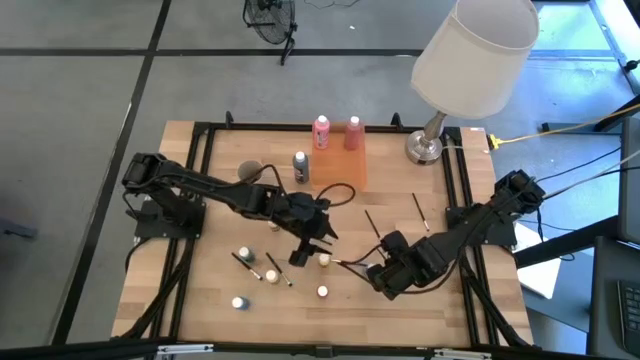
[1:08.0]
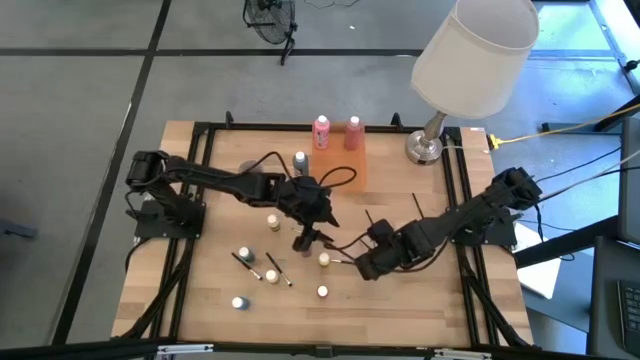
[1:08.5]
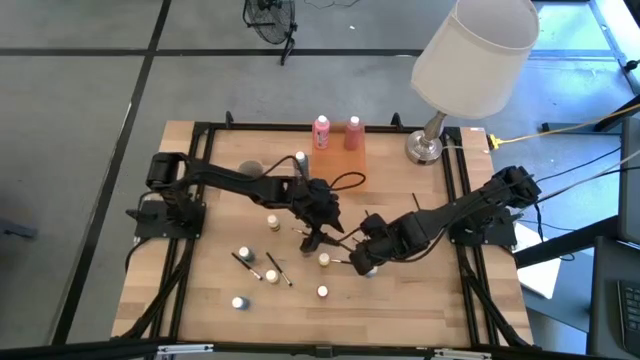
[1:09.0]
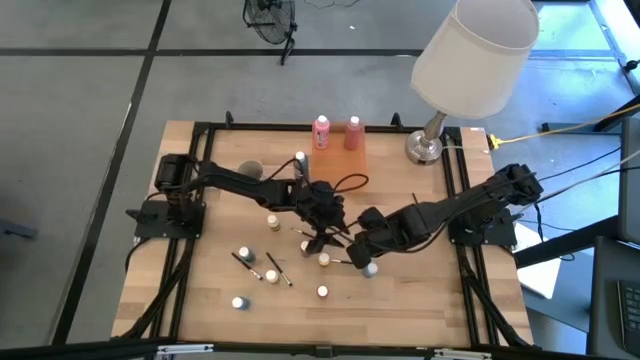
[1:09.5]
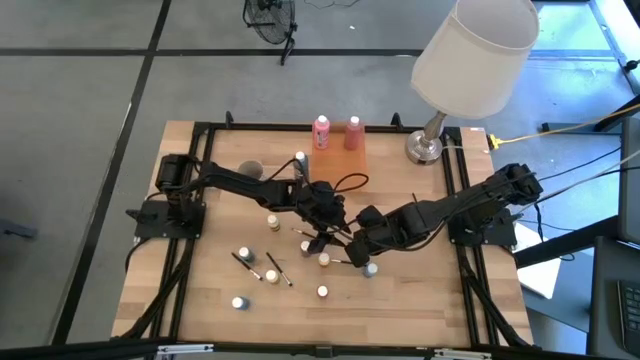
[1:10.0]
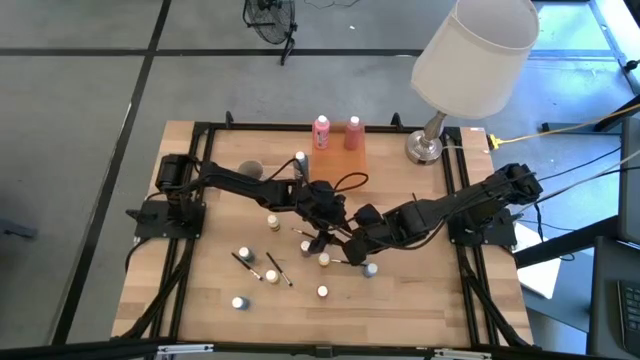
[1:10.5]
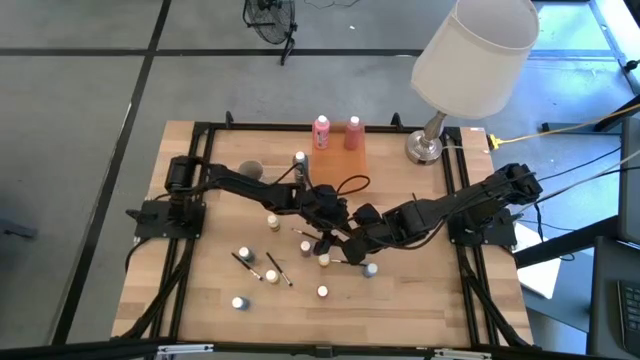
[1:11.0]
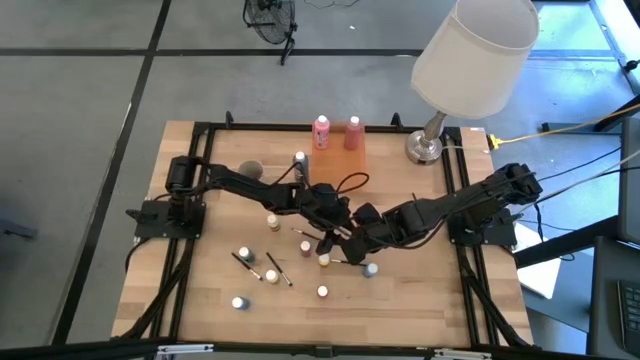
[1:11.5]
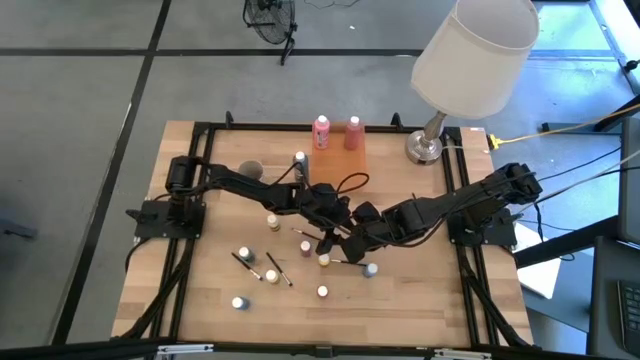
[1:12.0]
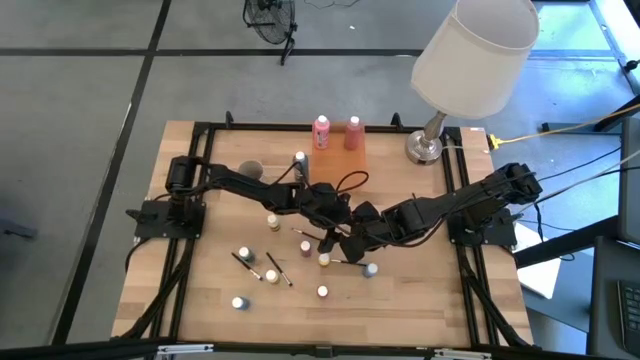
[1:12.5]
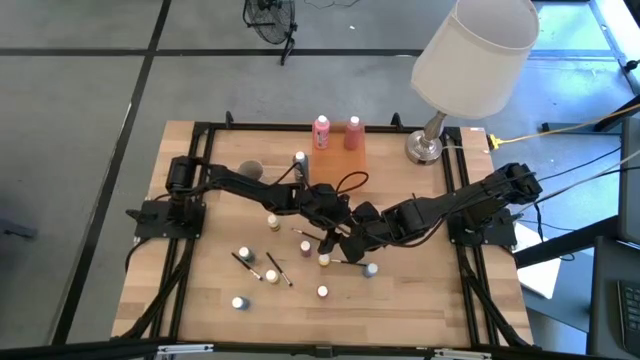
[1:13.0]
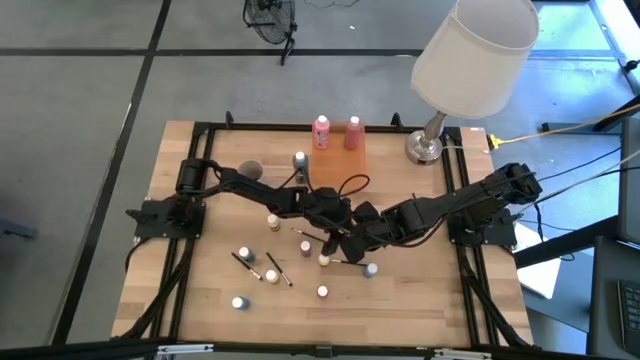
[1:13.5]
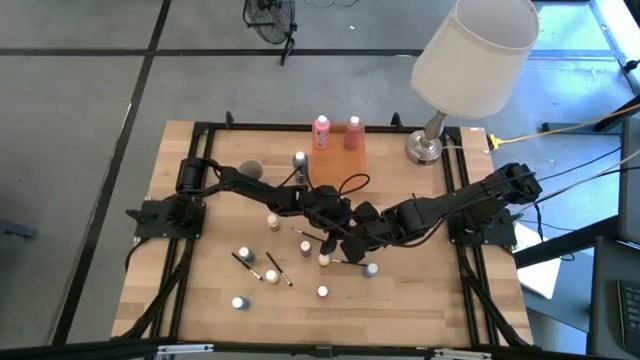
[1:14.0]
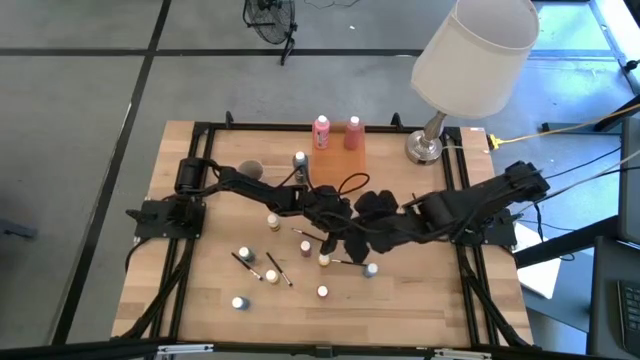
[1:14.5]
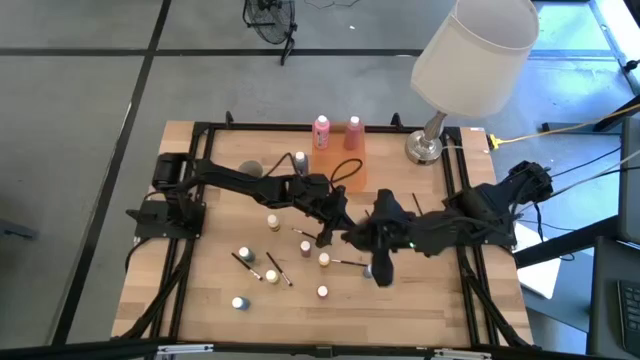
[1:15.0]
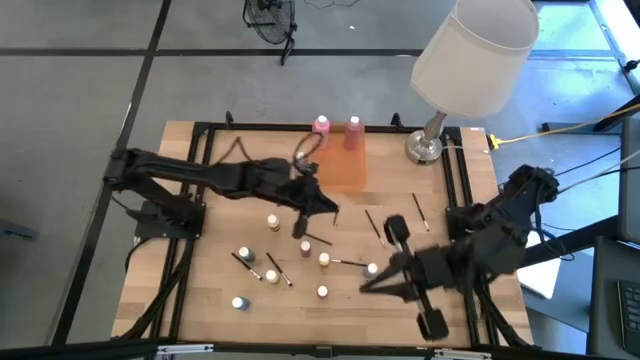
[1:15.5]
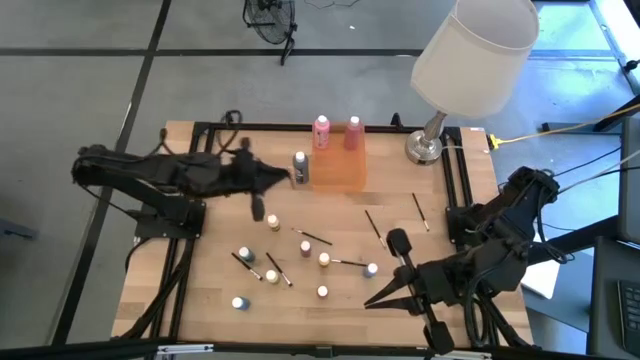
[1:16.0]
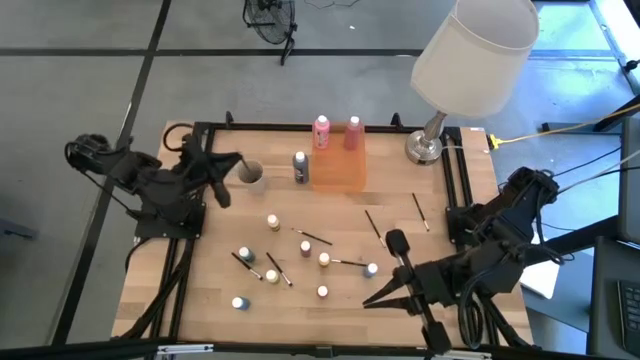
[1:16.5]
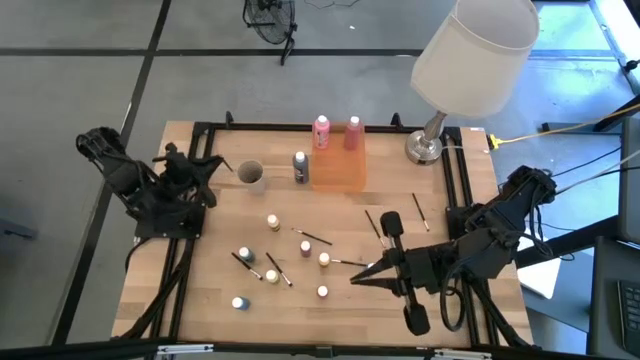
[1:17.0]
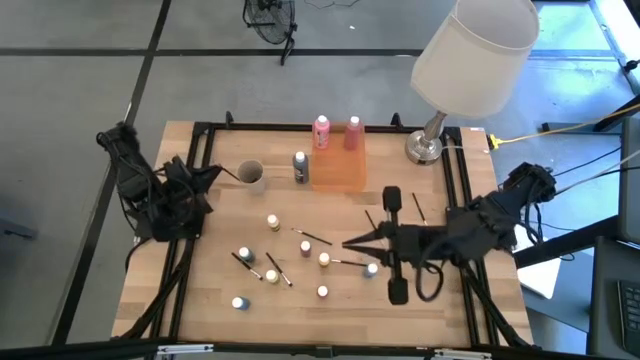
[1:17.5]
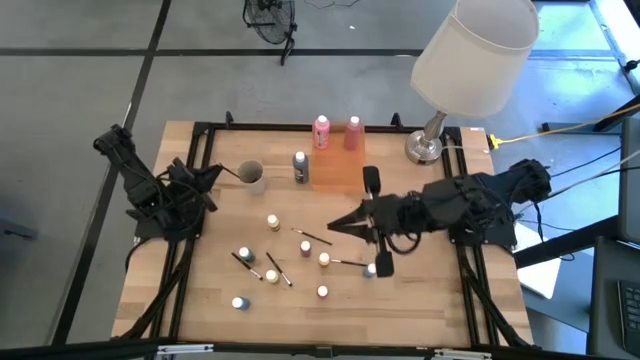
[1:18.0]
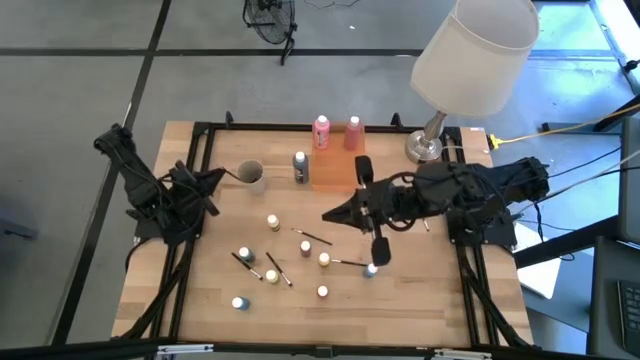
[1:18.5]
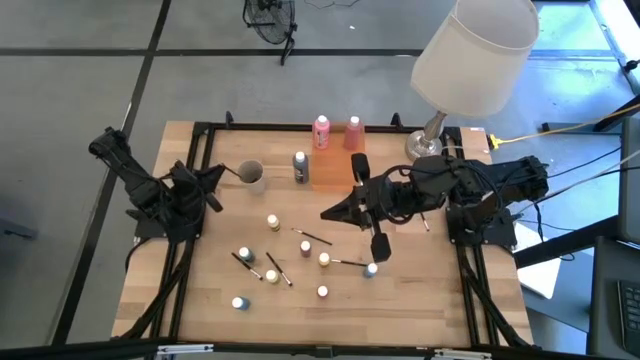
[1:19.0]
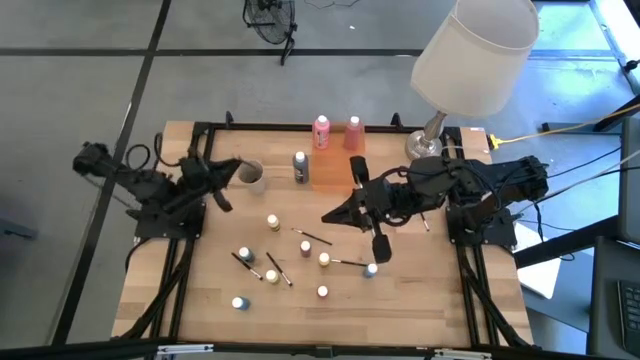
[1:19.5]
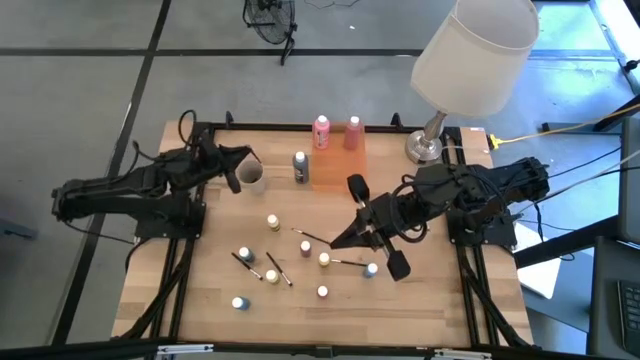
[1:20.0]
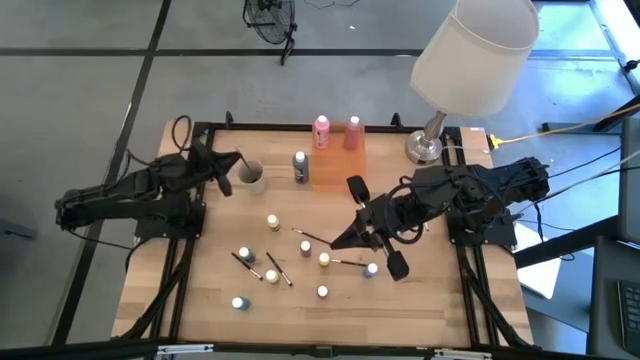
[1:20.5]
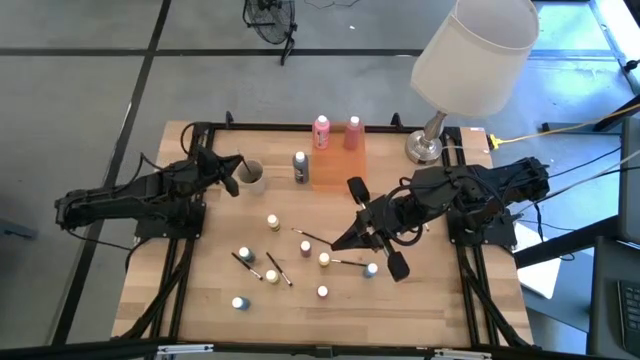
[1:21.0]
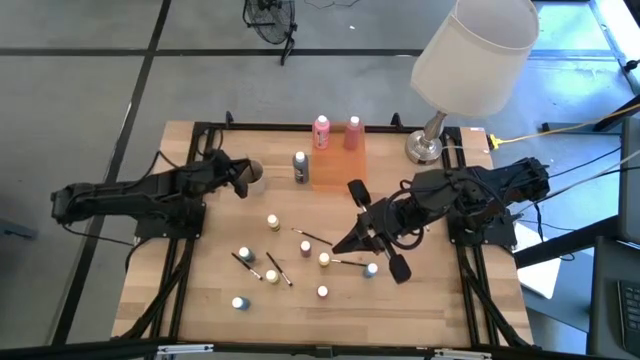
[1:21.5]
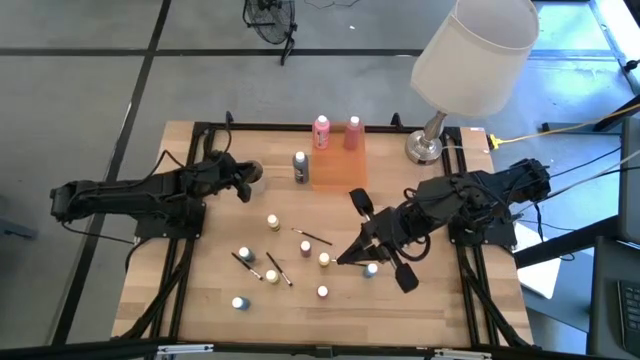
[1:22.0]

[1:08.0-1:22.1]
Task: Pick & Place Paint Supplies
Put the silver paint brush into the white cup

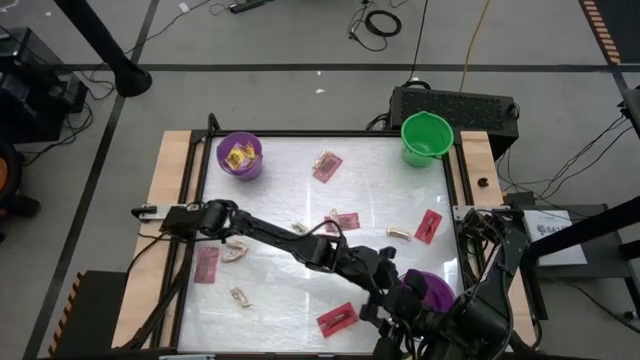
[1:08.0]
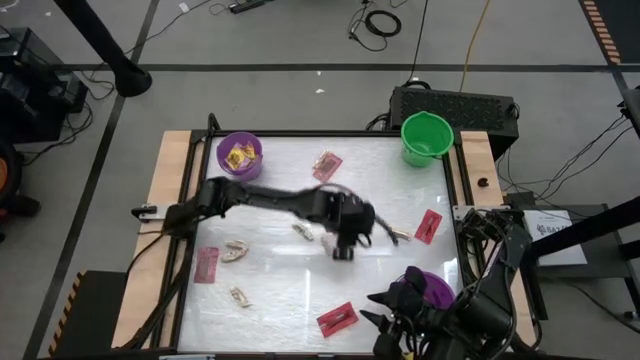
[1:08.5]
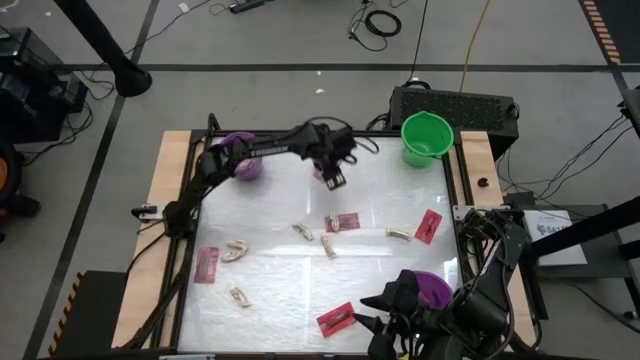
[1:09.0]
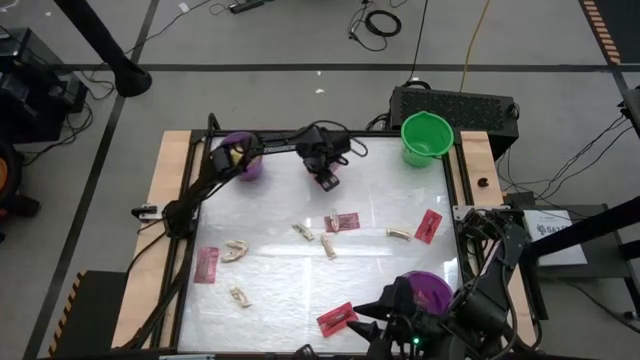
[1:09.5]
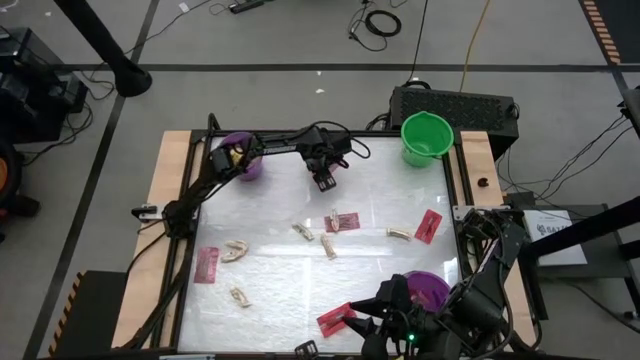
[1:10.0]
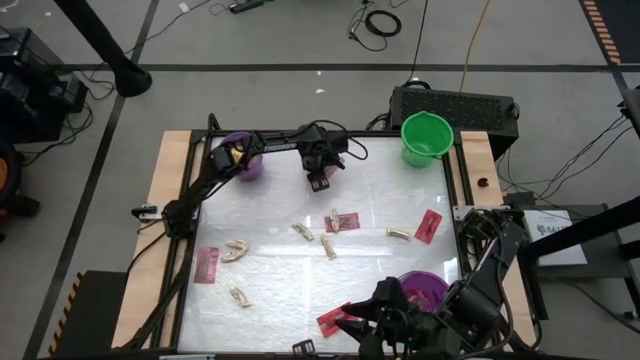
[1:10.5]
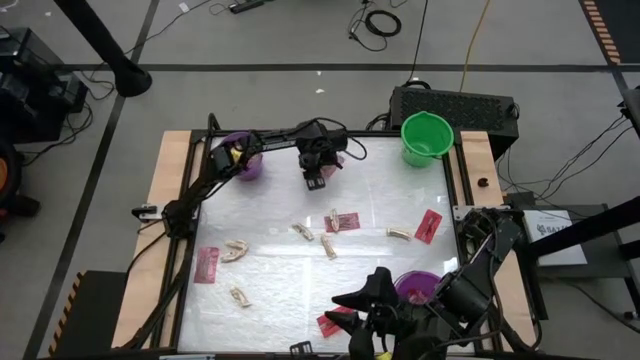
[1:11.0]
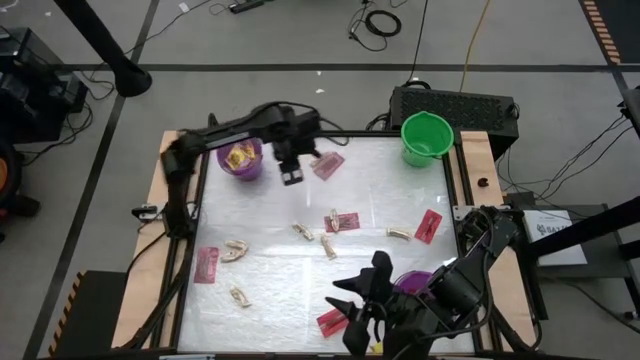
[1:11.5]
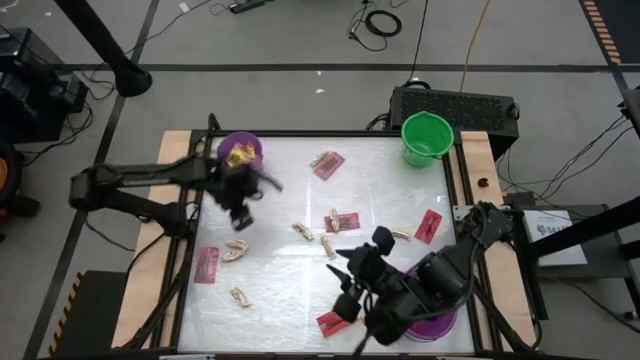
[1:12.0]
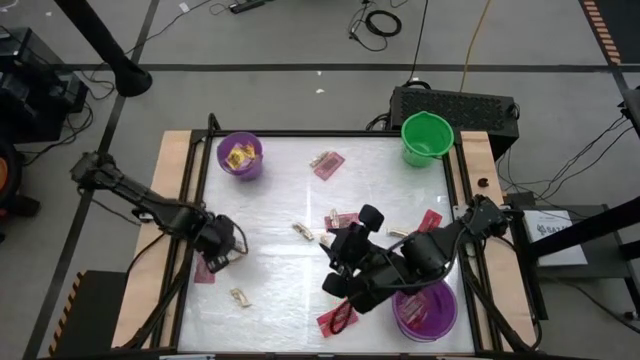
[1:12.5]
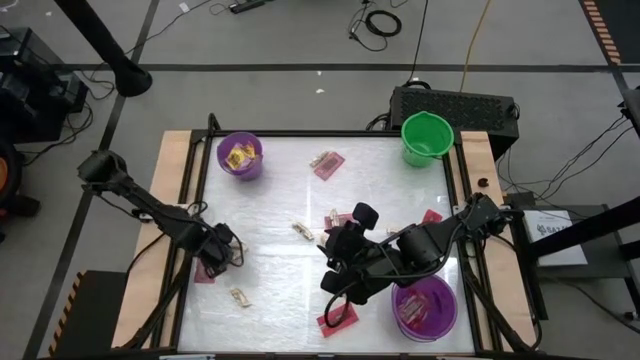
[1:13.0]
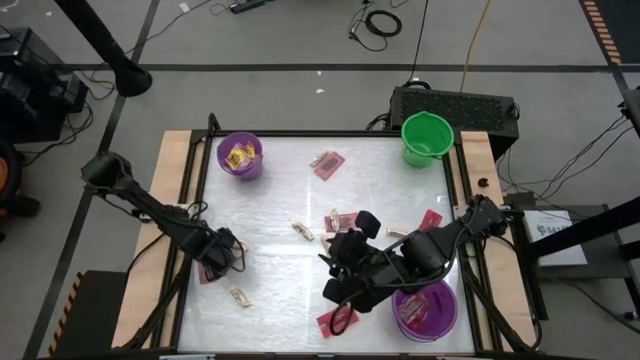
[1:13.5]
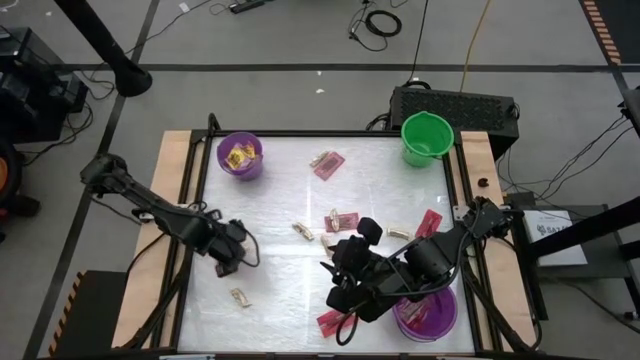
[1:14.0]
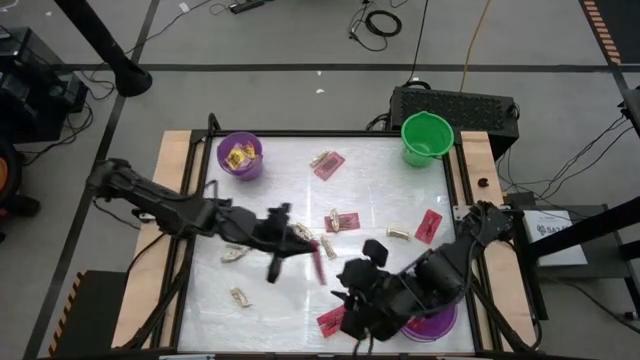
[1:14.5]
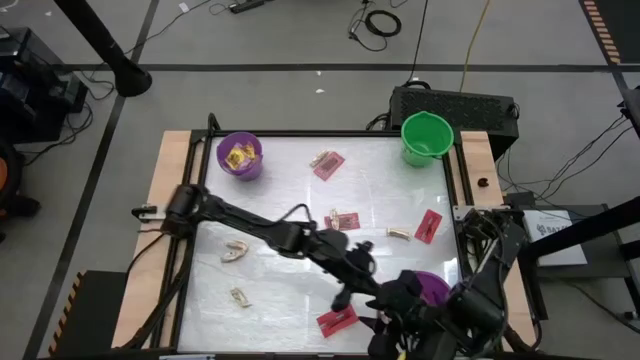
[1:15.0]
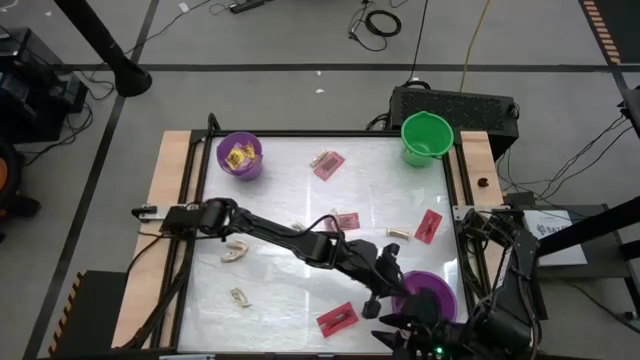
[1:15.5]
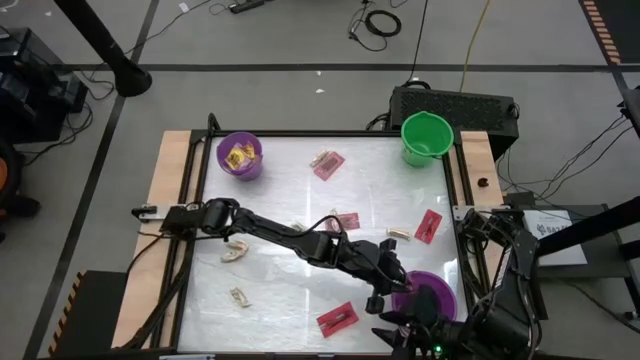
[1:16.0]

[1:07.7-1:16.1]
Task: Sort candy by brand, put in halloween buckets
Put the red candy into the bottom violet bucket
